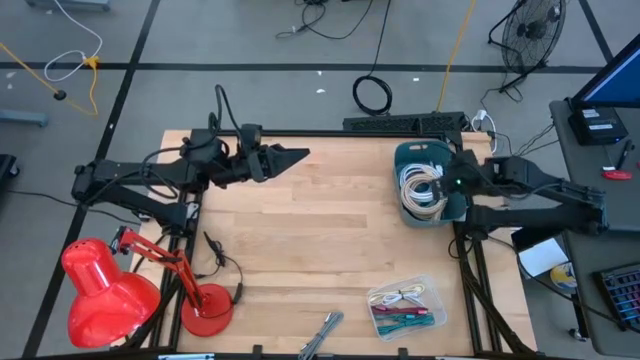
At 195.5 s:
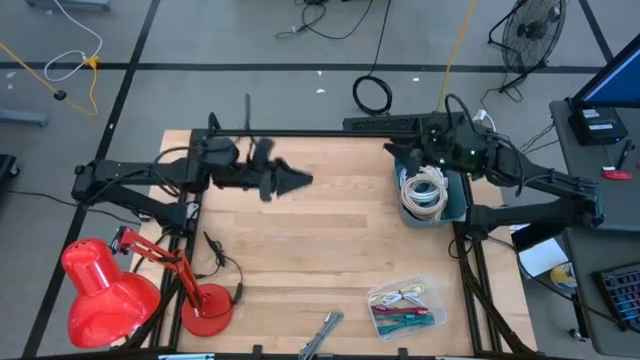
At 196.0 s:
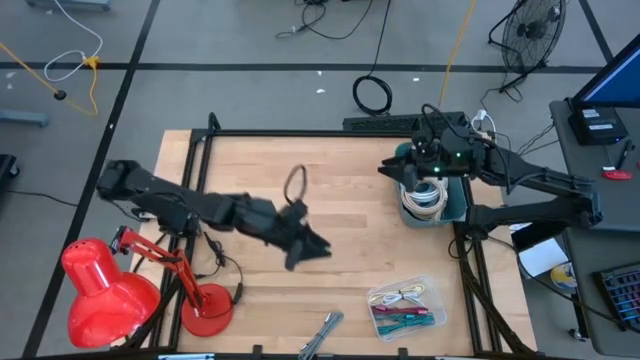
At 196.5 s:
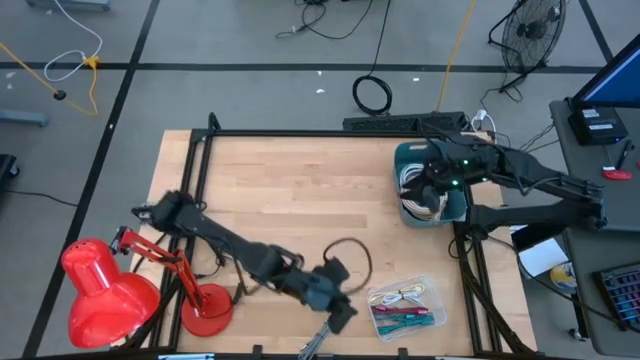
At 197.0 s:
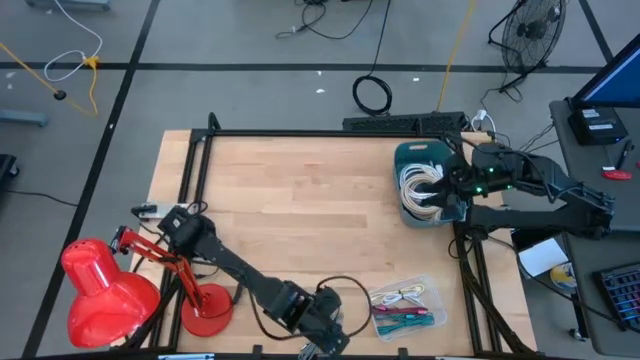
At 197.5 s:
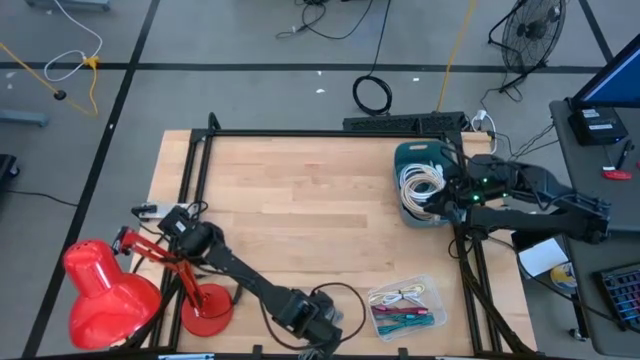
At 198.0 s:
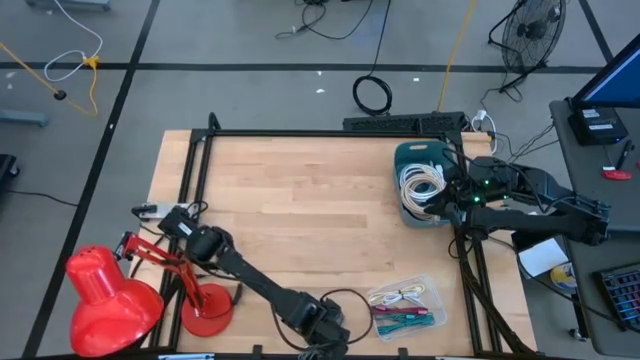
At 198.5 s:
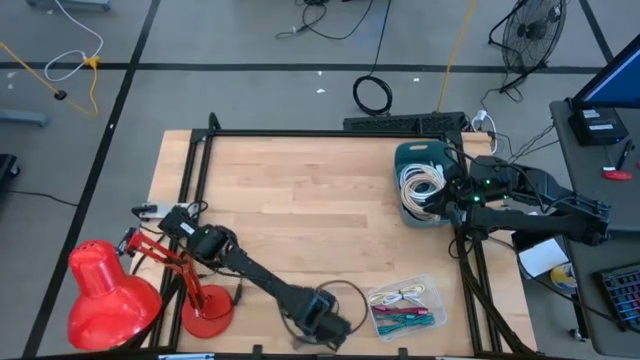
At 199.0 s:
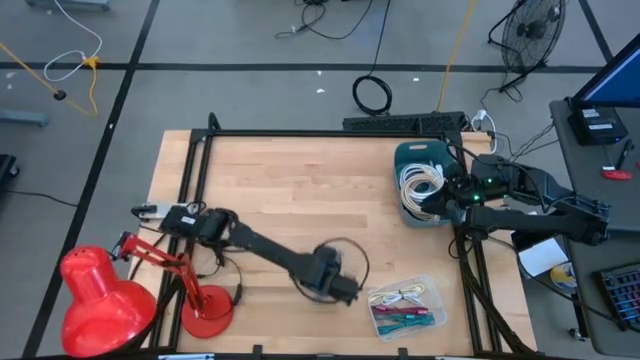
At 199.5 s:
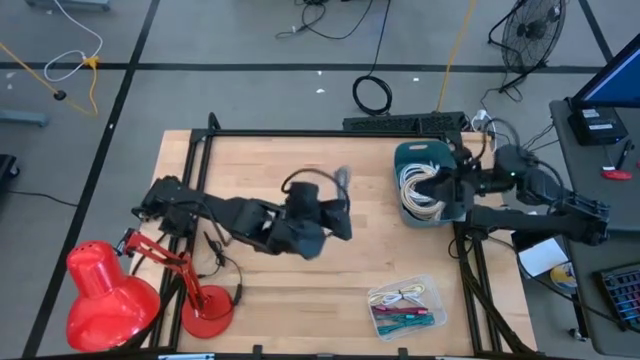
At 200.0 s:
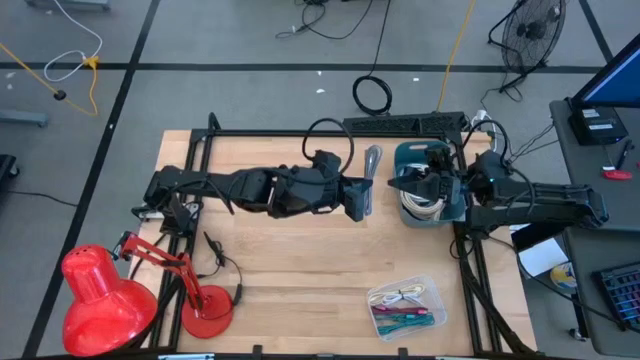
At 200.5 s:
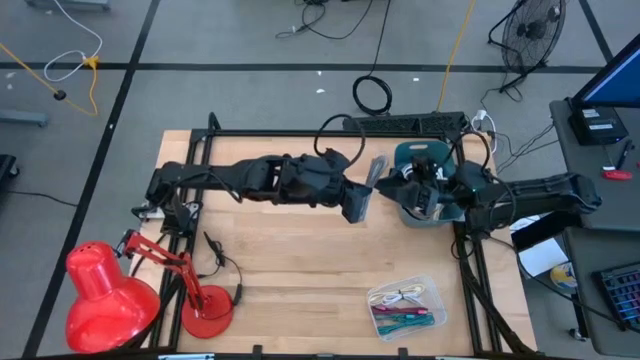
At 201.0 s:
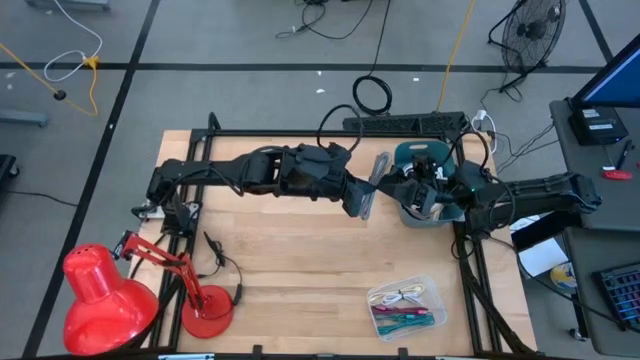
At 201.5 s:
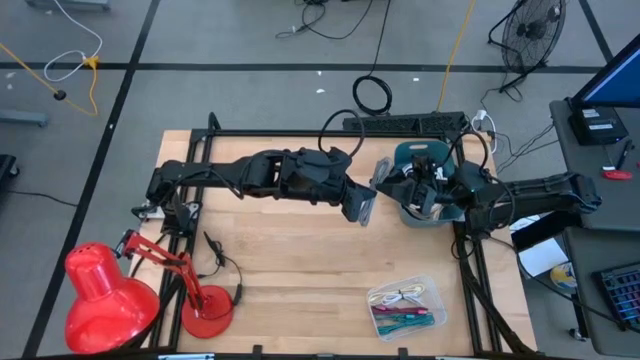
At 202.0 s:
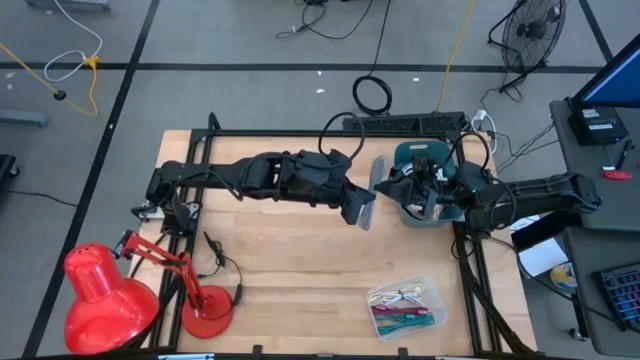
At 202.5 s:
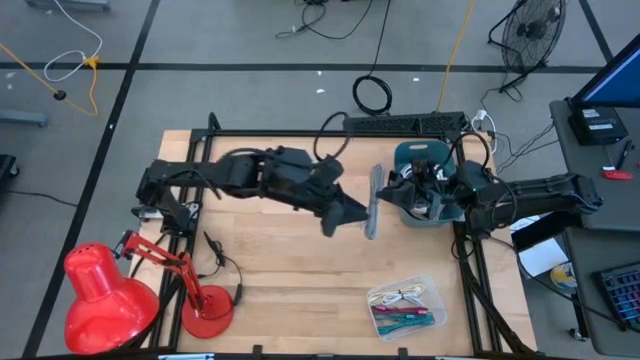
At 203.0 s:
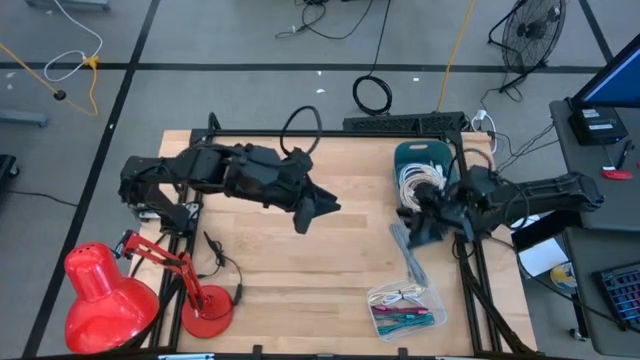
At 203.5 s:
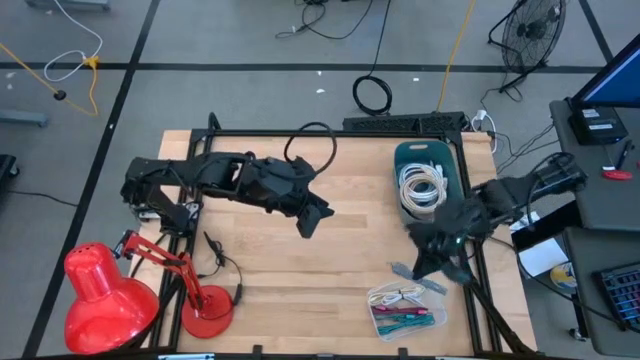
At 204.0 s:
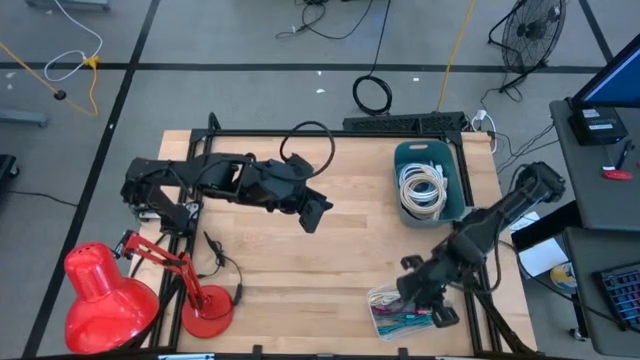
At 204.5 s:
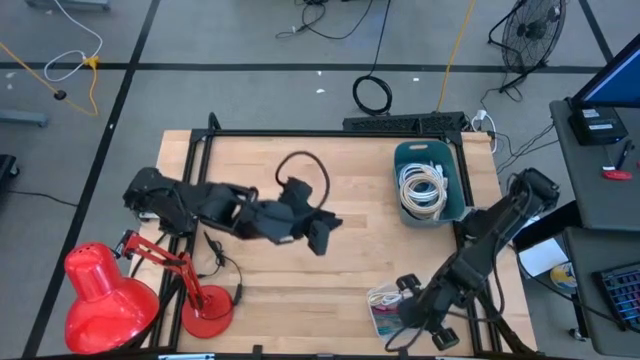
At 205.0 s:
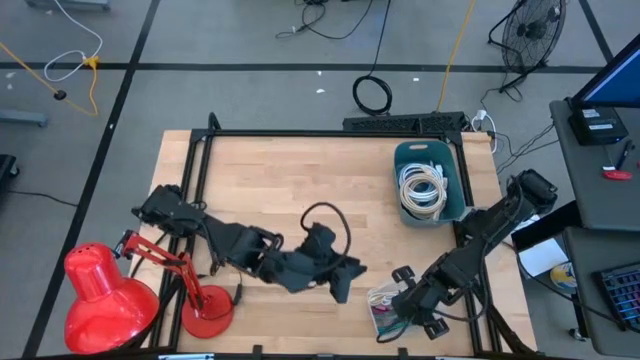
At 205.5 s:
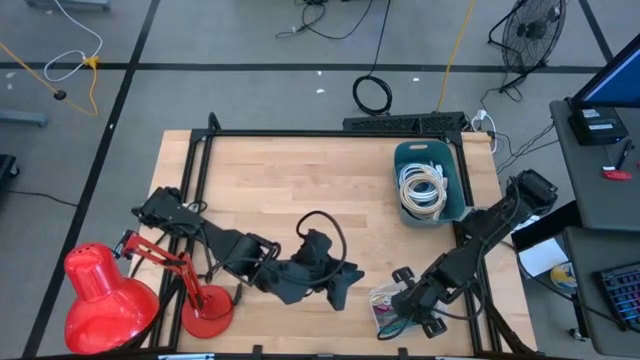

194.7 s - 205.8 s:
Task: Pick & Place USB Port
Put the white patterned charger cable into the transparent bin

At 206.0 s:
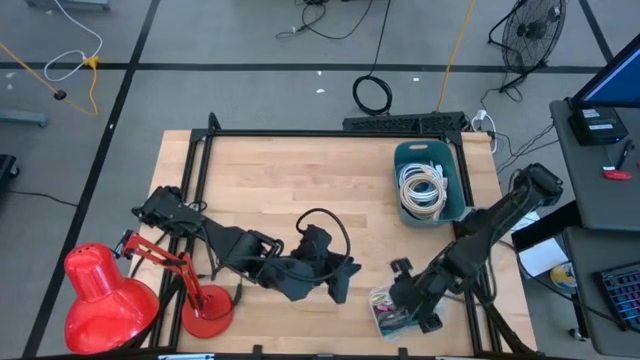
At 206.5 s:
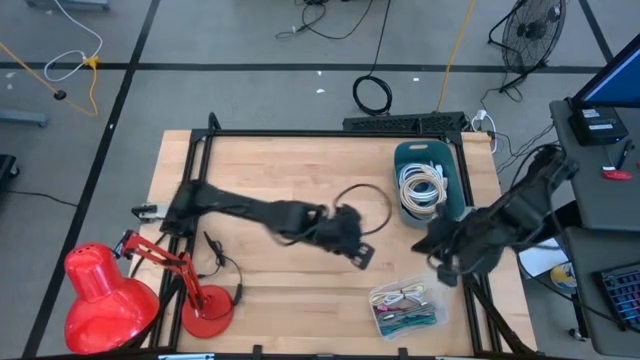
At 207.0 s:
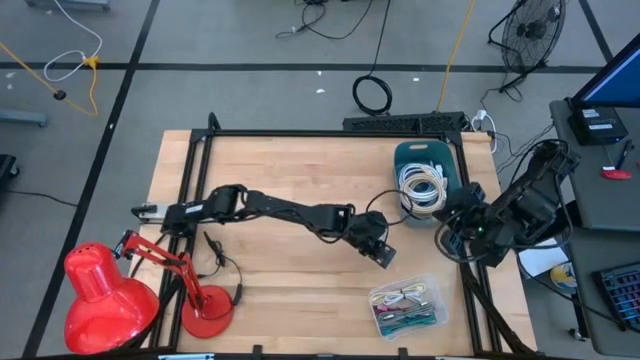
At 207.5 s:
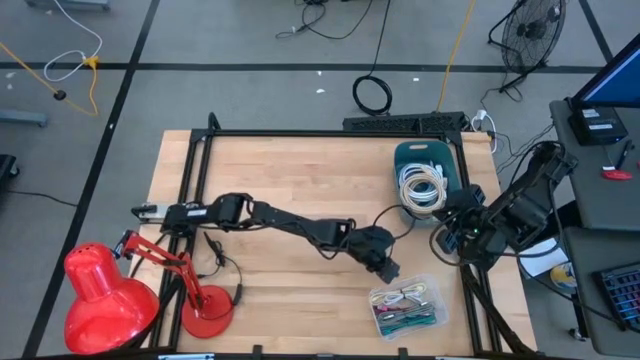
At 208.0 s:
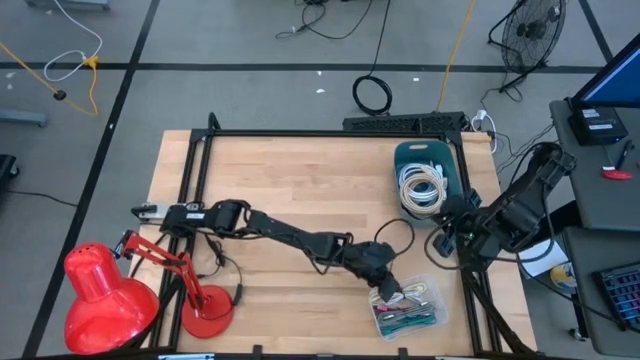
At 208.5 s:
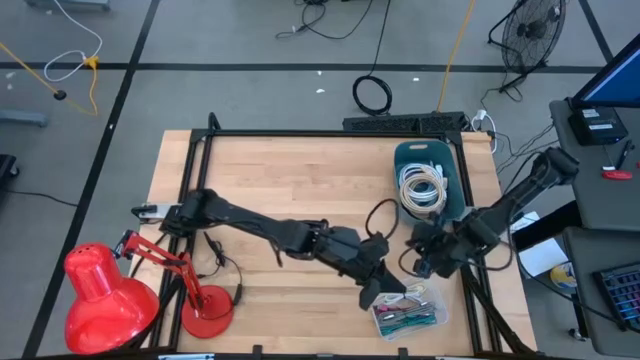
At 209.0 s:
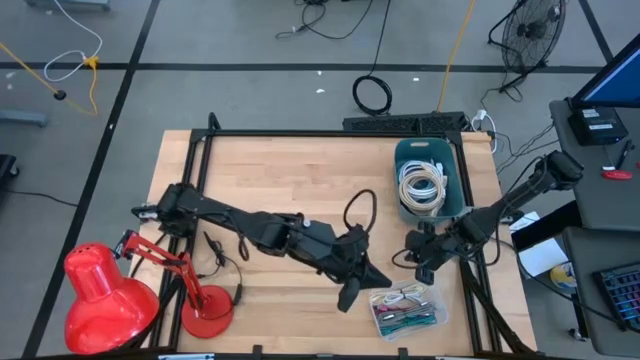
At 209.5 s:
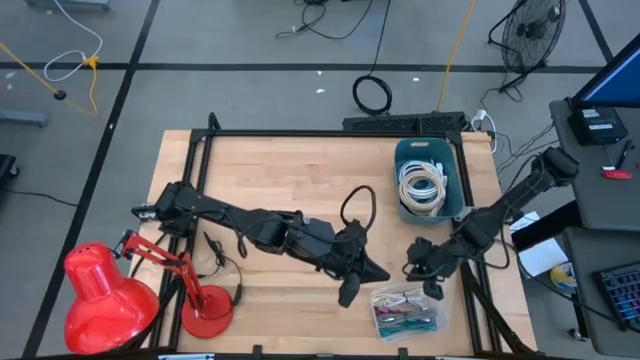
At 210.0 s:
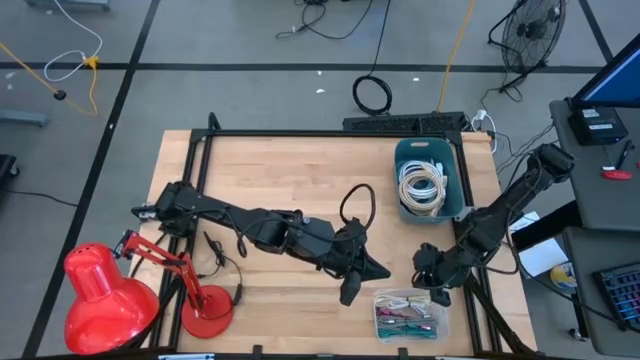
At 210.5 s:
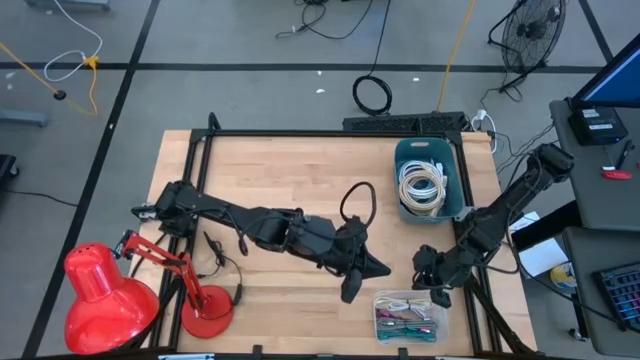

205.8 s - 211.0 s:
Adjust the transparent bin

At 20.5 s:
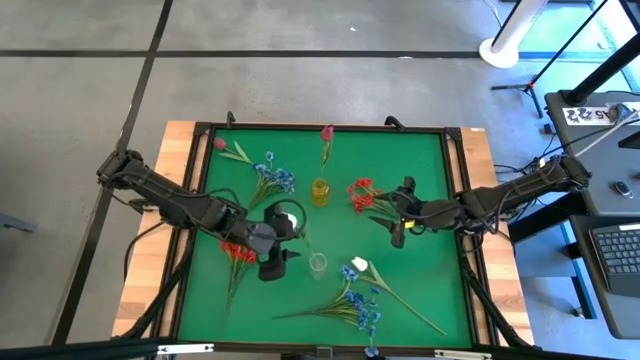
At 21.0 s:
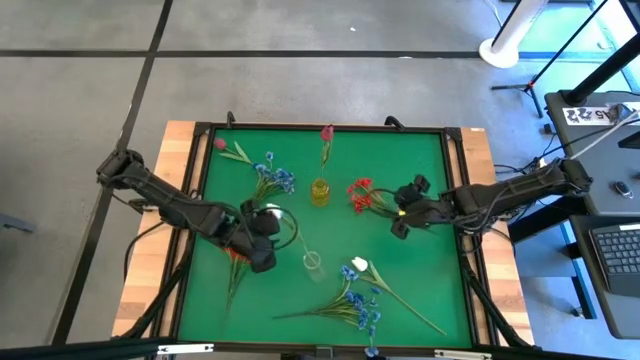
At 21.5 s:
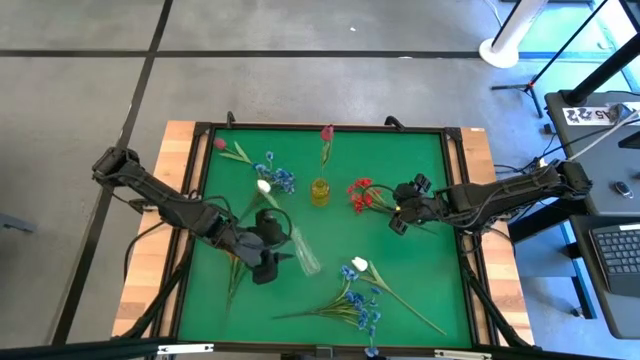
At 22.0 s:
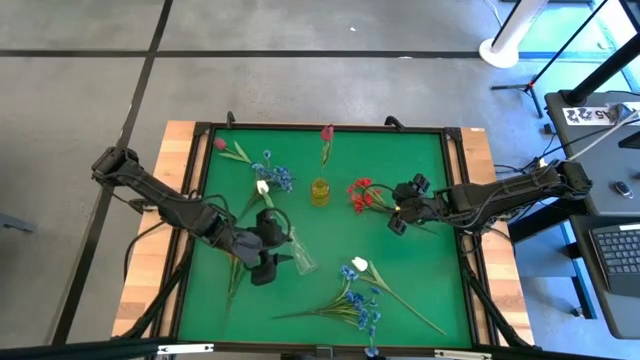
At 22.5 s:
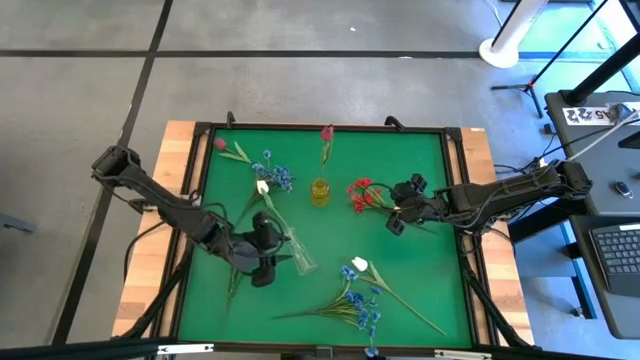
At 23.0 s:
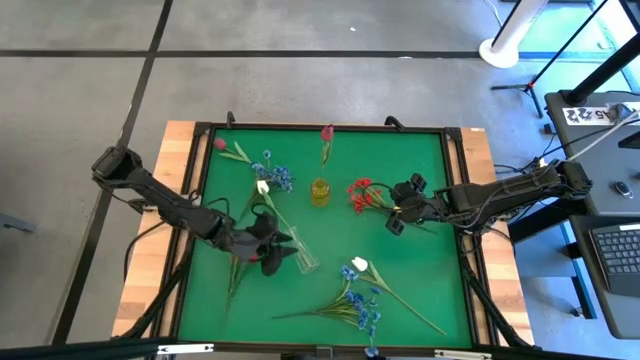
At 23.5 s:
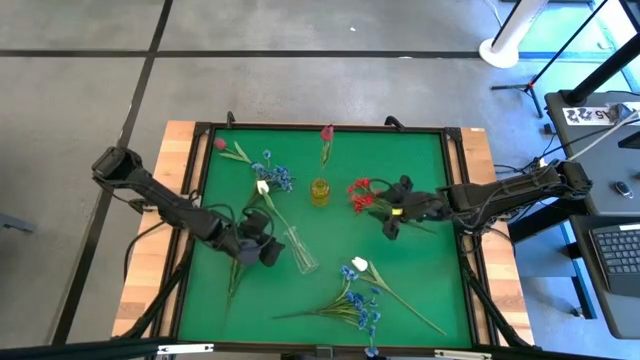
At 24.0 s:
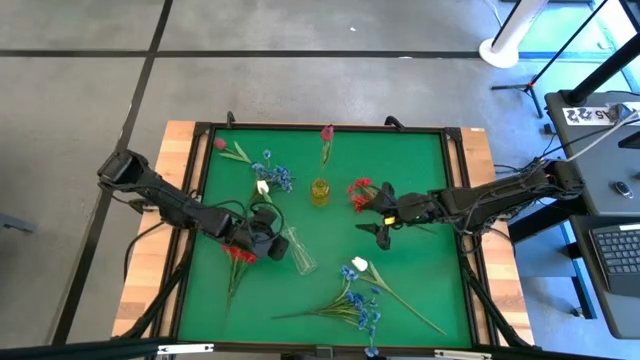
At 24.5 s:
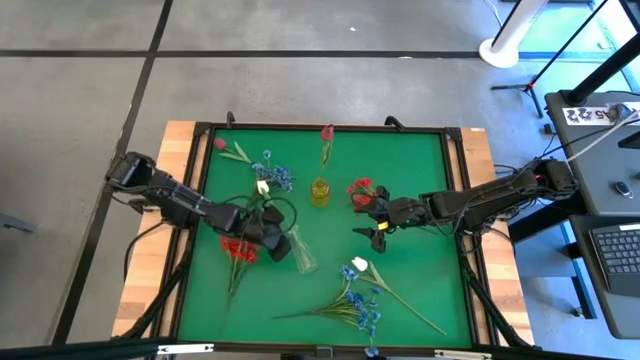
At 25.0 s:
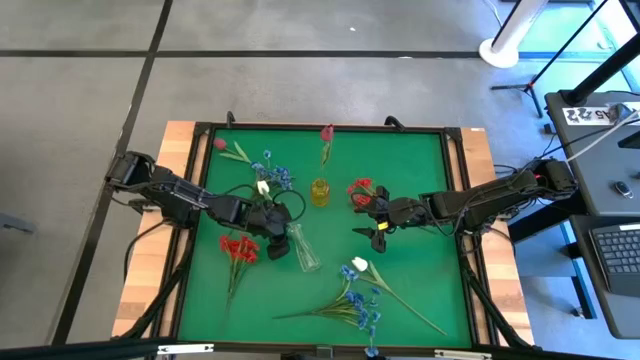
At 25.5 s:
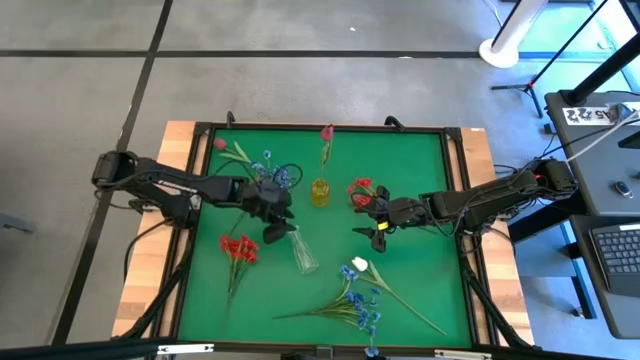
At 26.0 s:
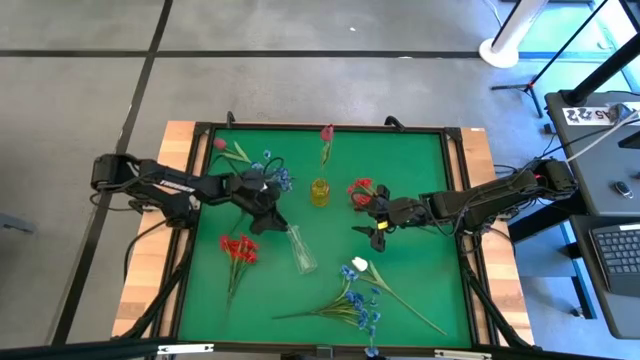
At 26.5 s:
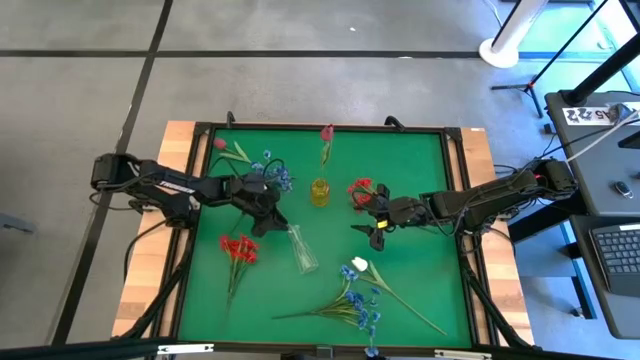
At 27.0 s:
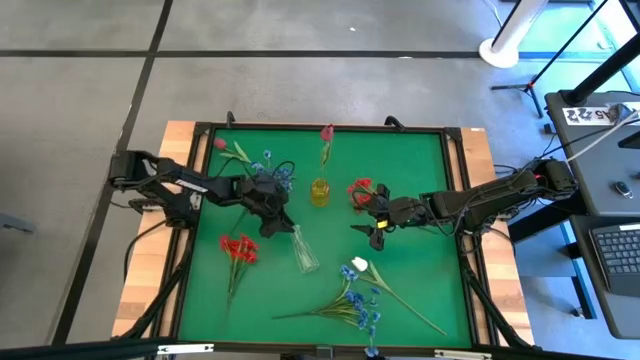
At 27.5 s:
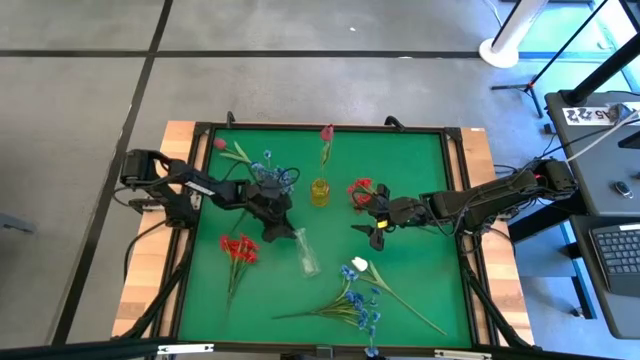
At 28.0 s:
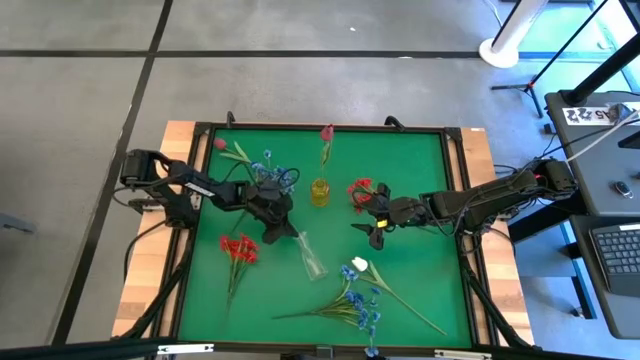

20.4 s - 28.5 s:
Task: Sort flowers into vase by color
Adjust the transparent flower vase
